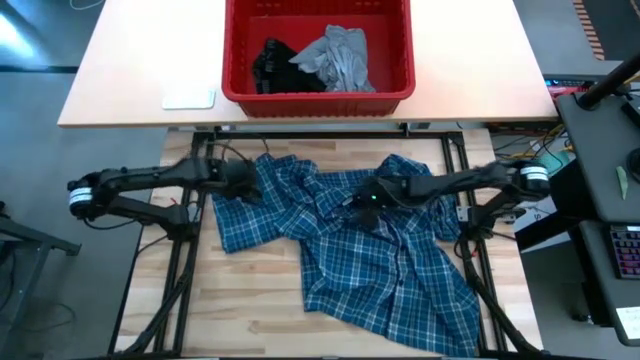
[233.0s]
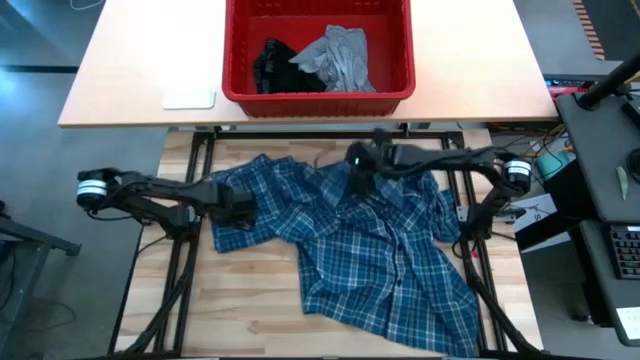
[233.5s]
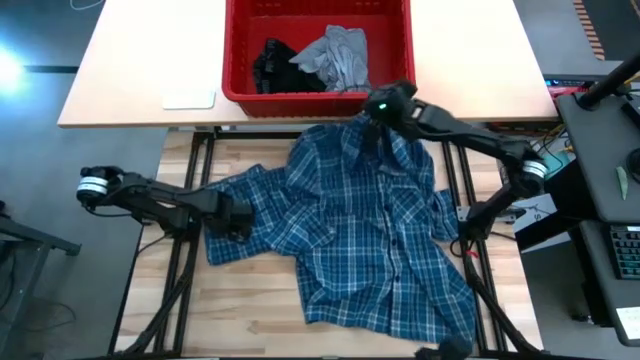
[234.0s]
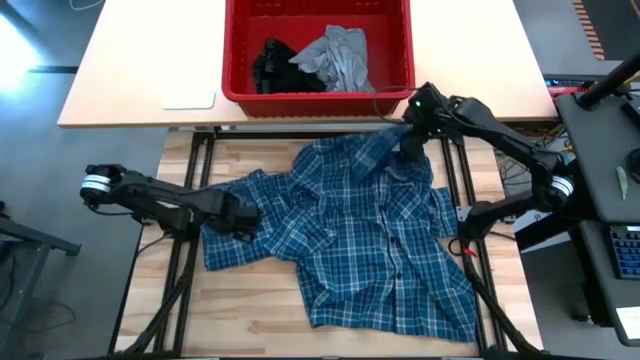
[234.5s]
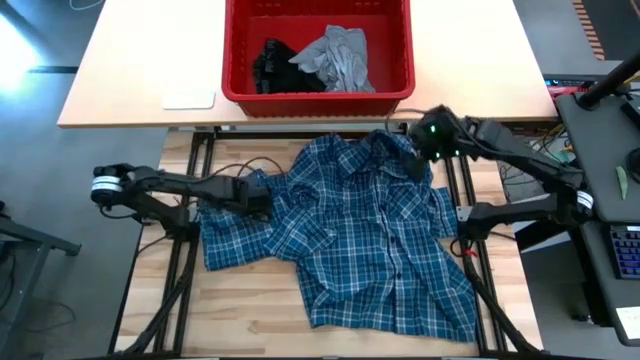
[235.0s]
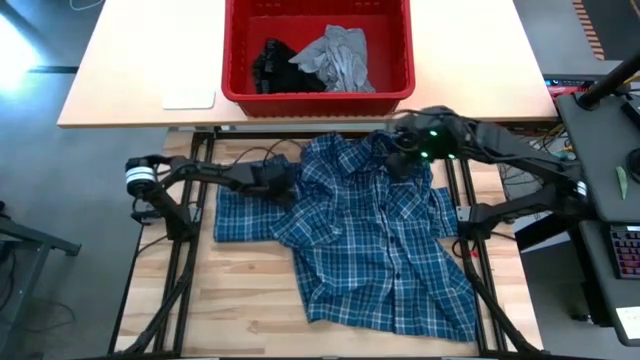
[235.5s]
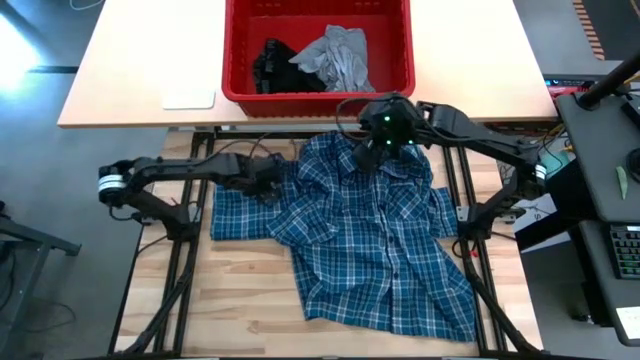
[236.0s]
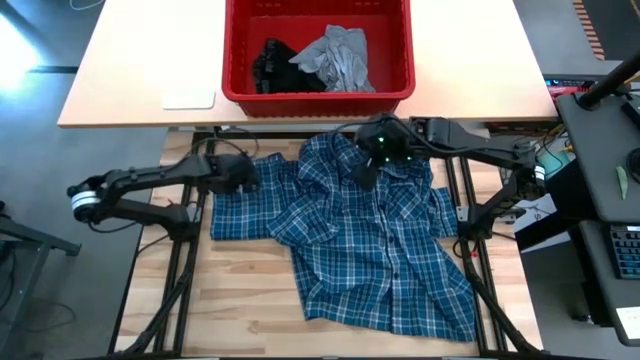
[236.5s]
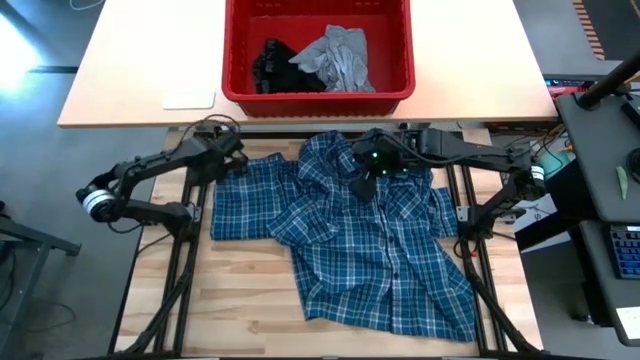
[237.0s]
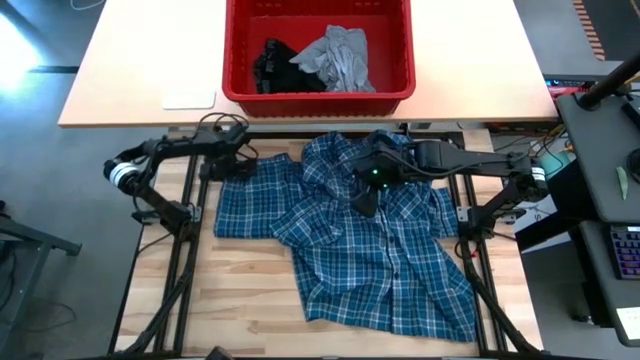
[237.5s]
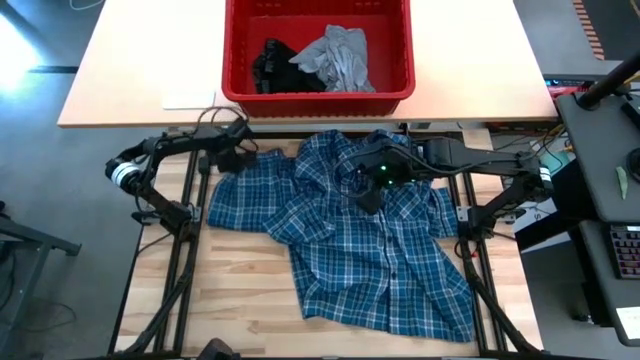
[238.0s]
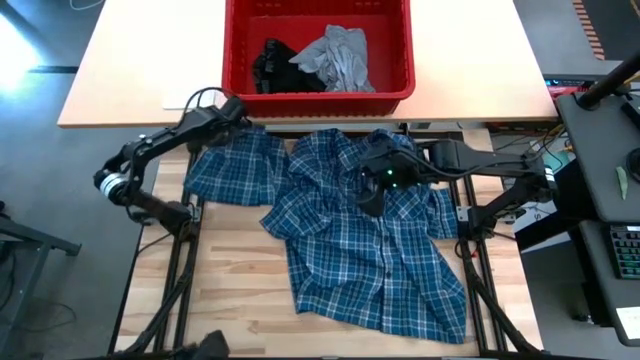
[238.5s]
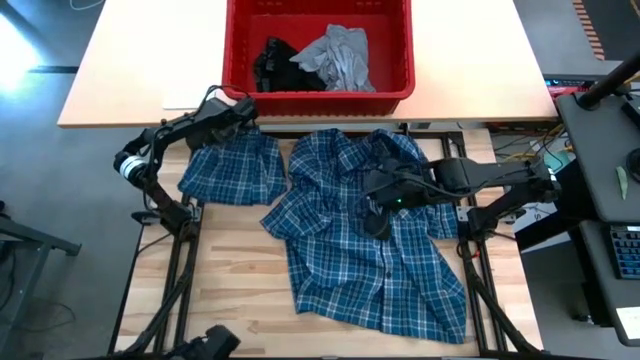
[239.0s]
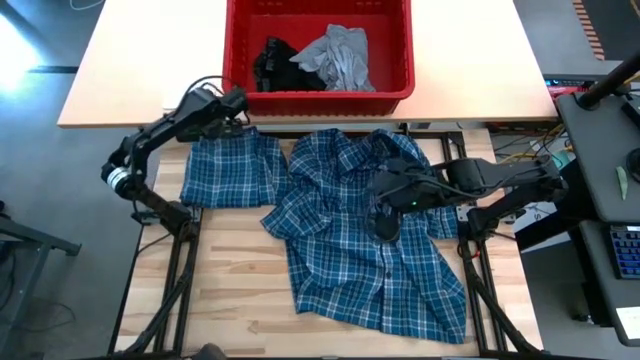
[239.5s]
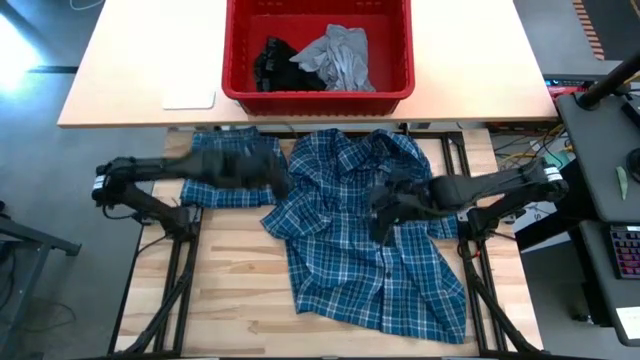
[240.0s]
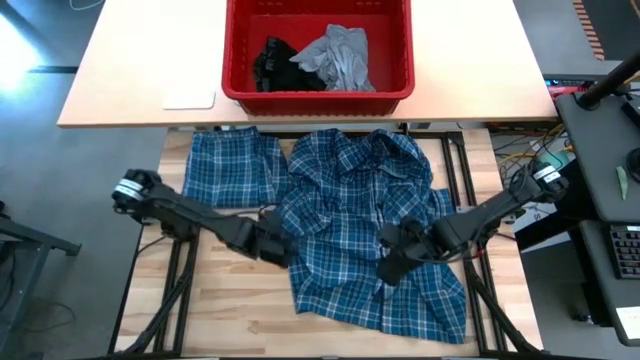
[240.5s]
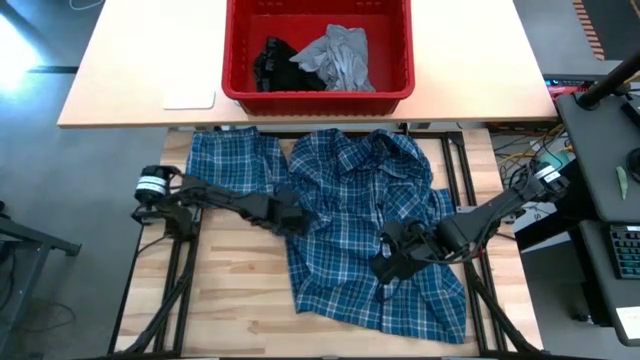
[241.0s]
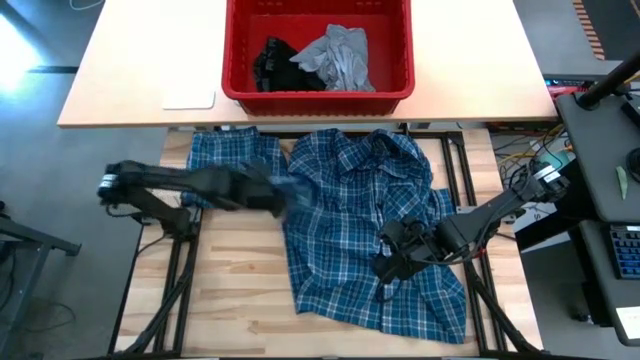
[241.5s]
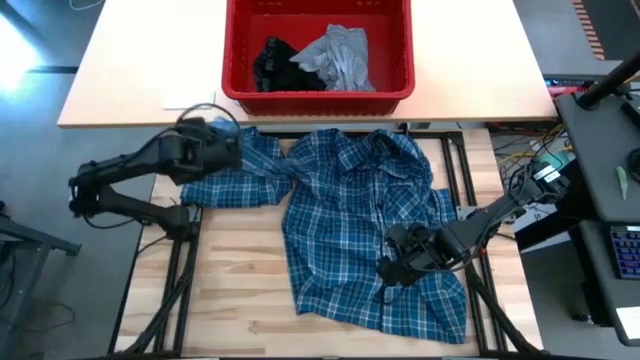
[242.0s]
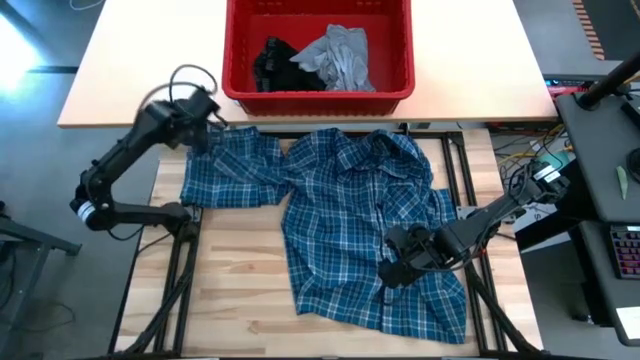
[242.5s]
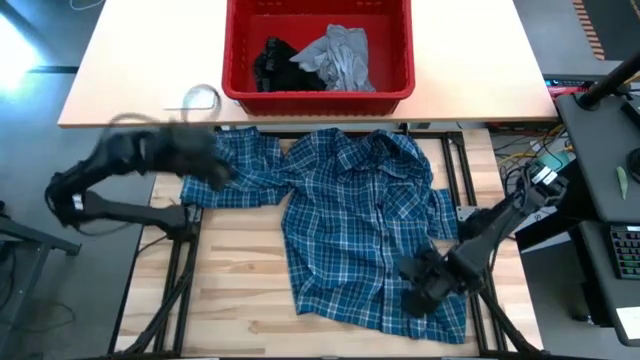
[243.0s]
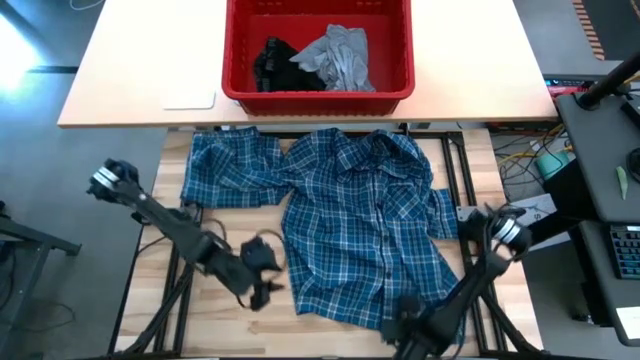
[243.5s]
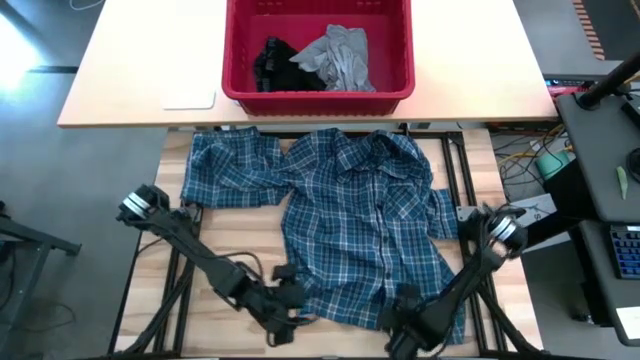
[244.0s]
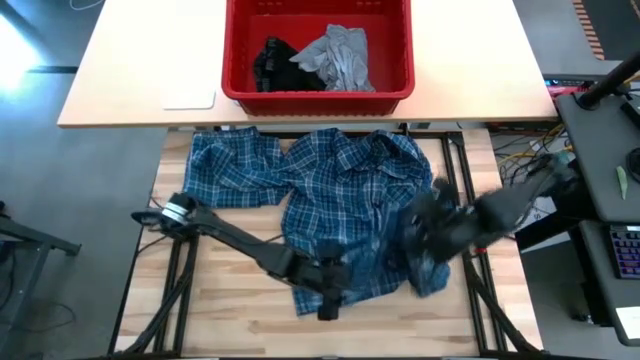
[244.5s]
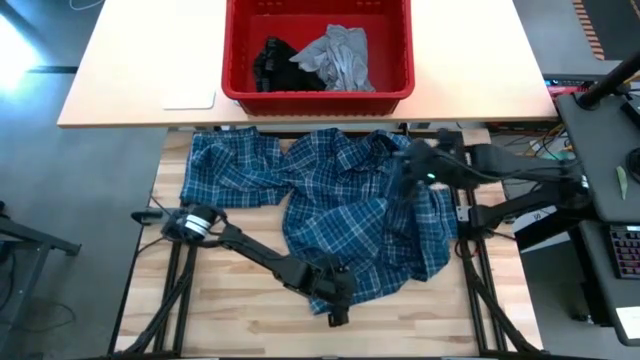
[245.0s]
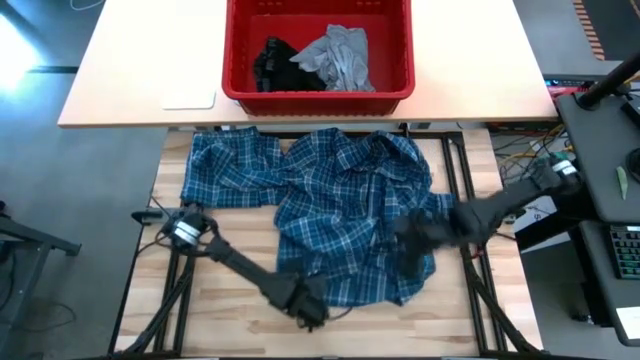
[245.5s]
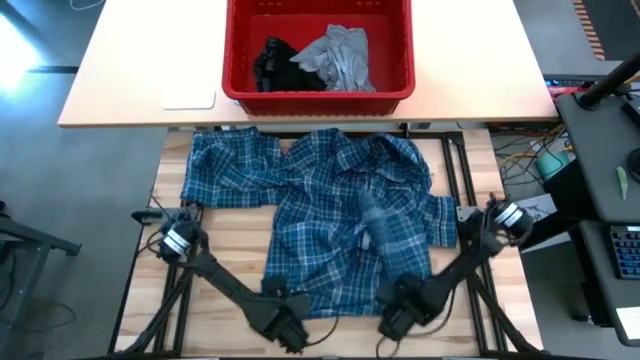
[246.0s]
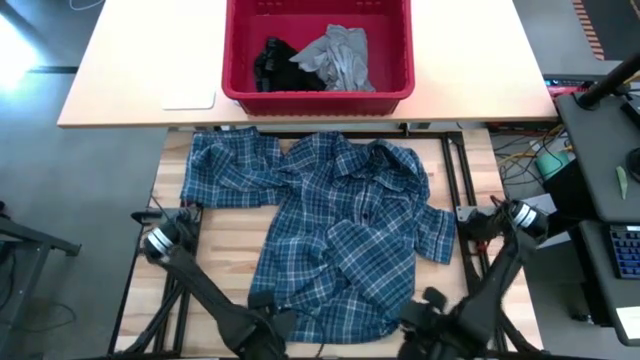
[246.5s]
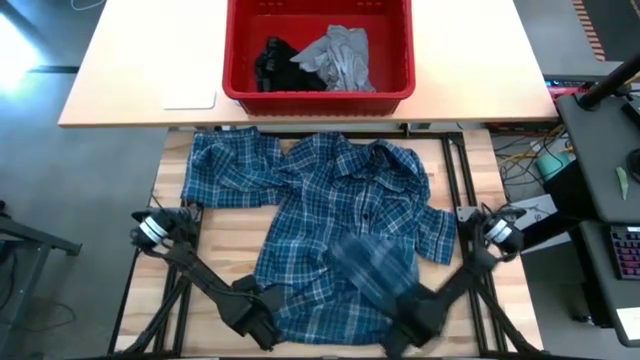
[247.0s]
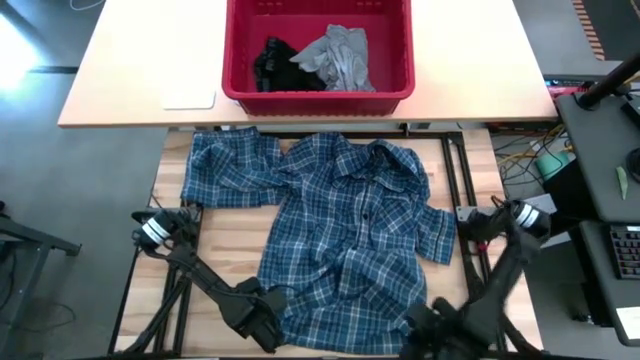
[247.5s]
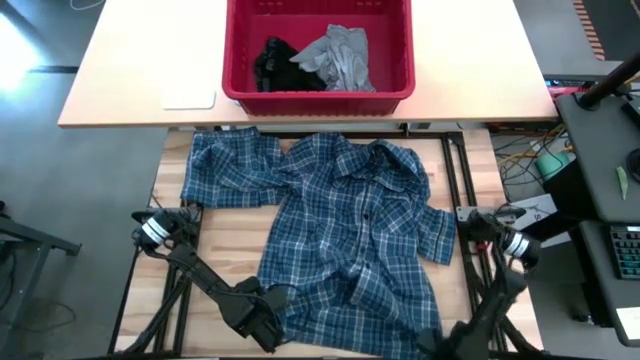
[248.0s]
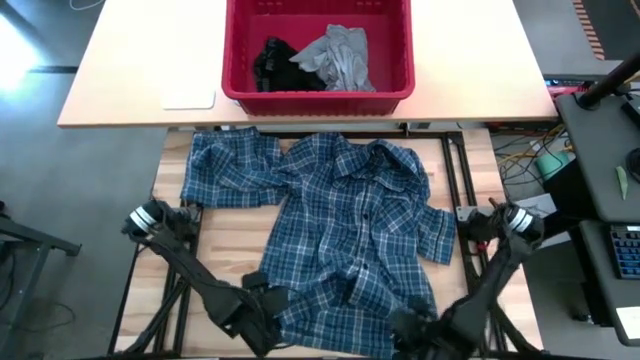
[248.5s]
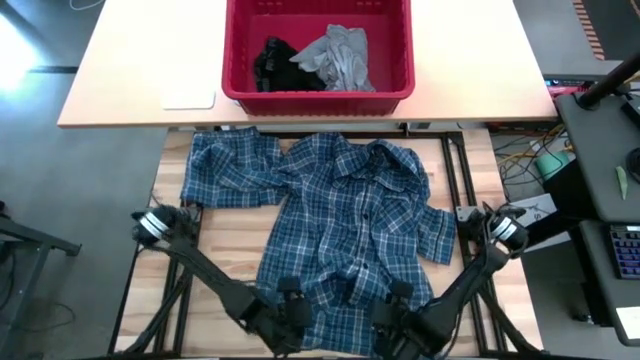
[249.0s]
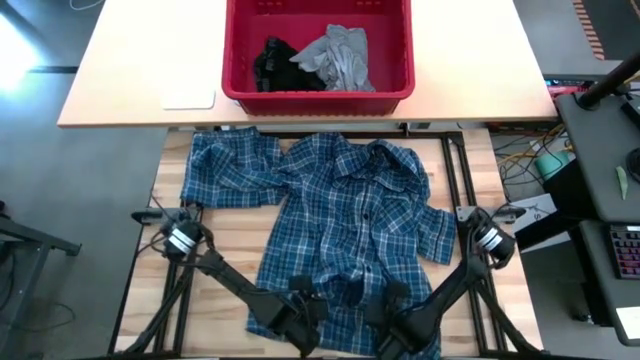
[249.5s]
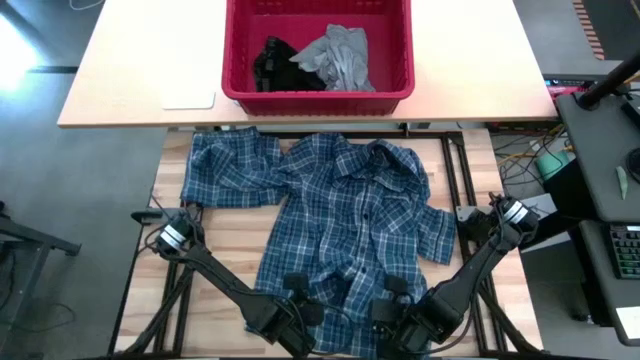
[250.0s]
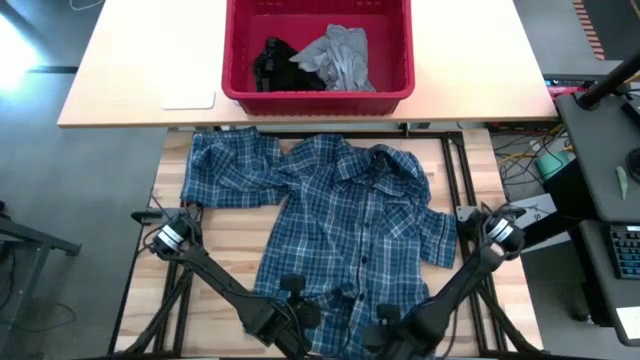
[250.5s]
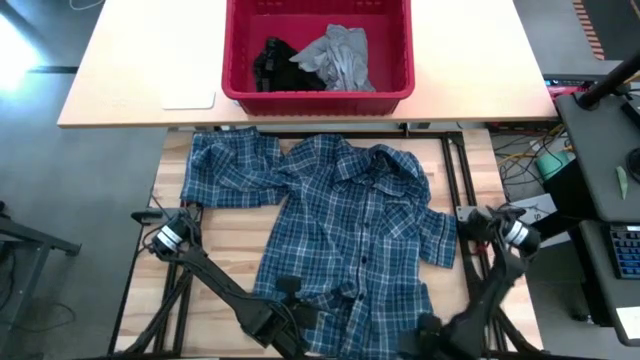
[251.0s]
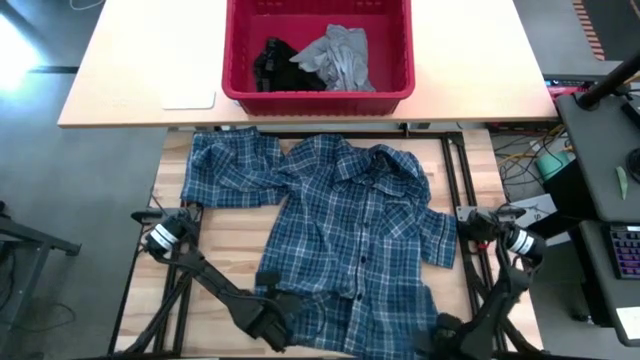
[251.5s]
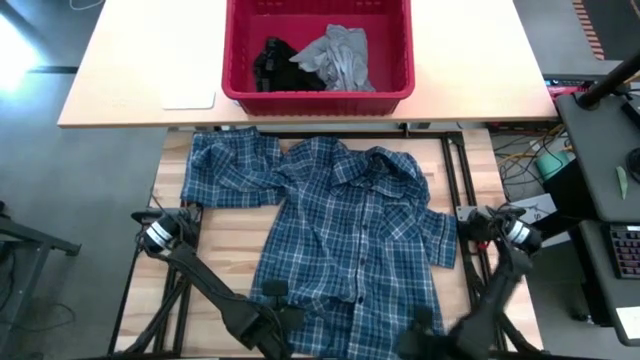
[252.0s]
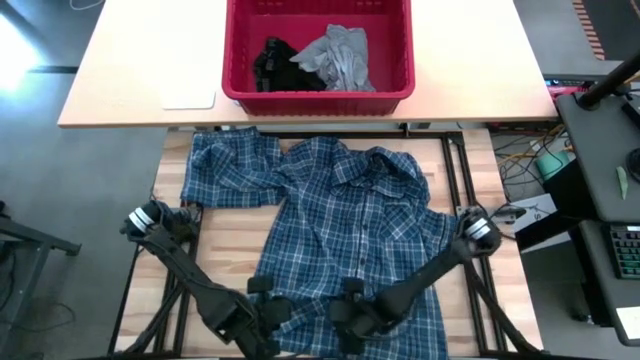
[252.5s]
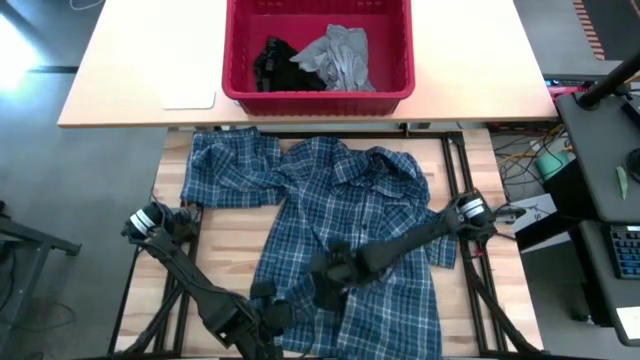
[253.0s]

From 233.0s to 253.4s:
Task: Fold Laundry from Bin
Fold the blue patterned long sleeve shirt
